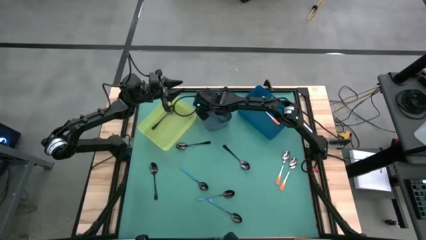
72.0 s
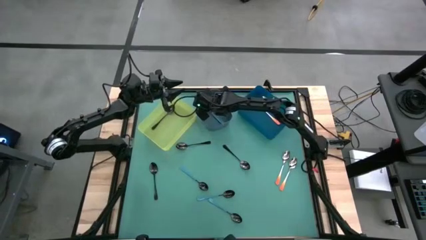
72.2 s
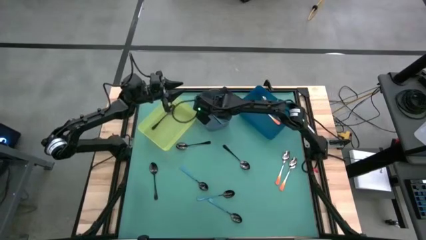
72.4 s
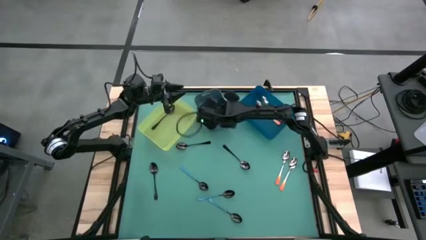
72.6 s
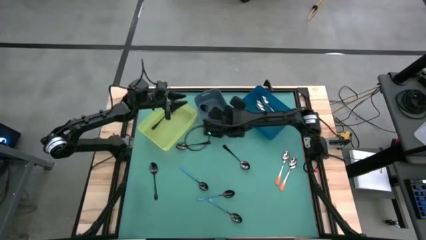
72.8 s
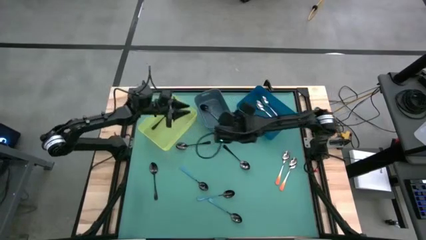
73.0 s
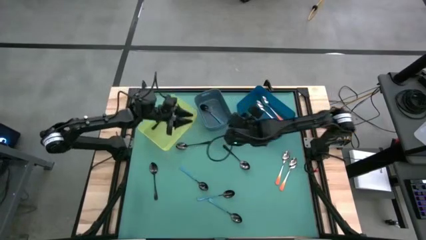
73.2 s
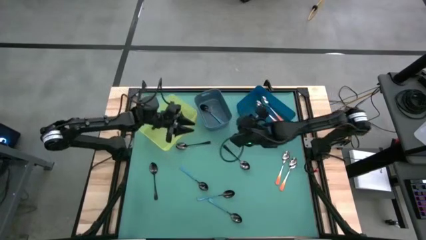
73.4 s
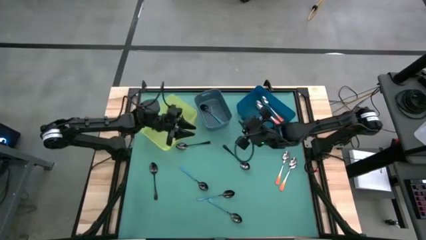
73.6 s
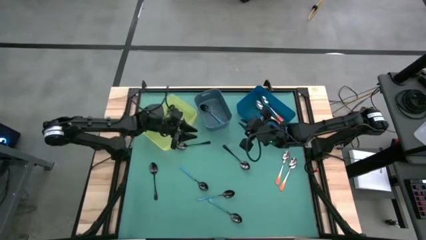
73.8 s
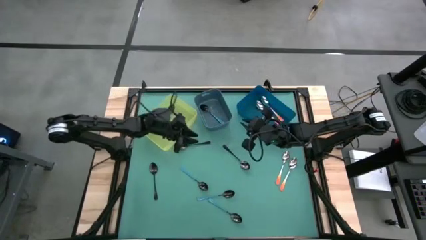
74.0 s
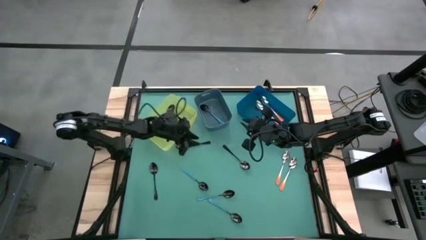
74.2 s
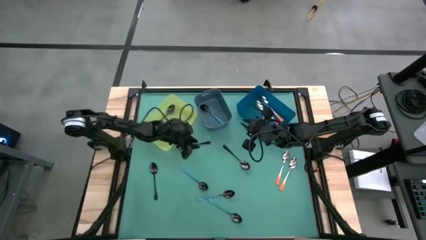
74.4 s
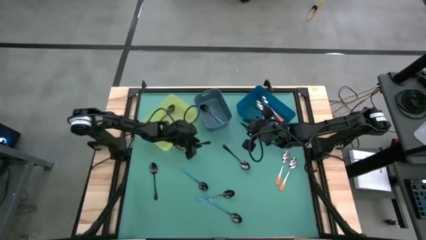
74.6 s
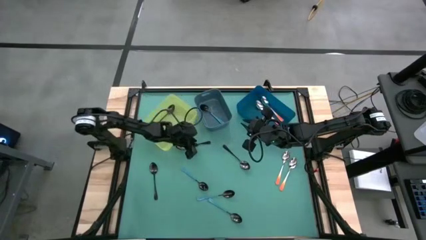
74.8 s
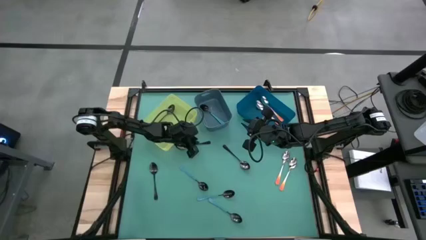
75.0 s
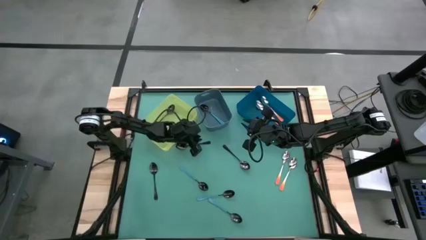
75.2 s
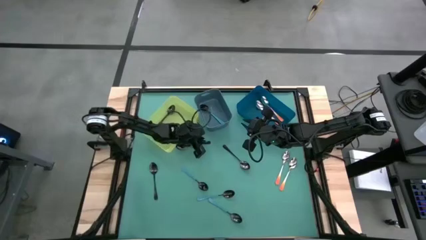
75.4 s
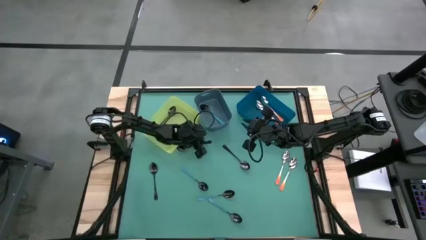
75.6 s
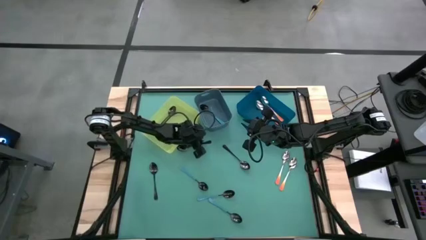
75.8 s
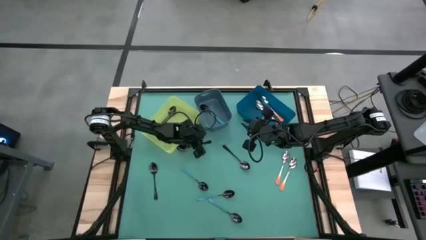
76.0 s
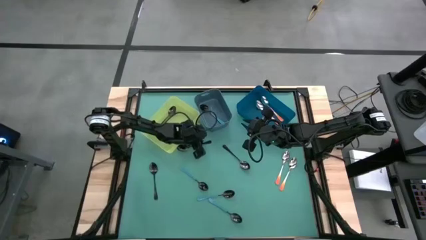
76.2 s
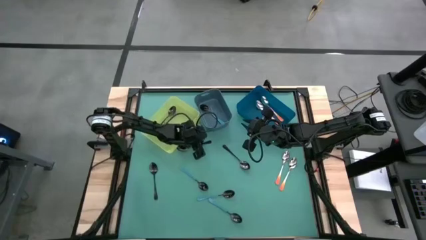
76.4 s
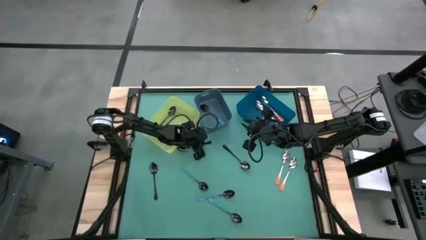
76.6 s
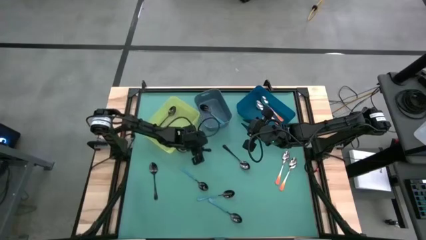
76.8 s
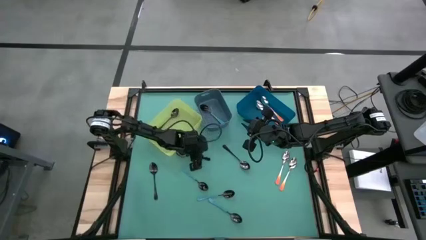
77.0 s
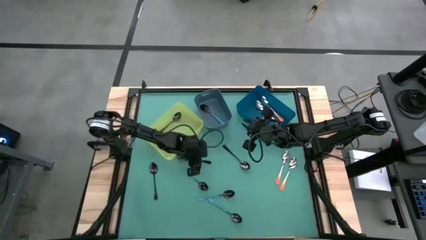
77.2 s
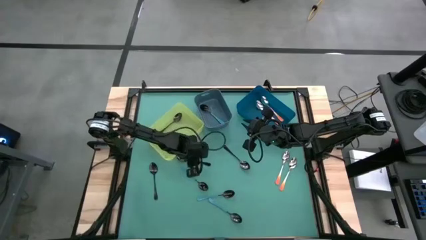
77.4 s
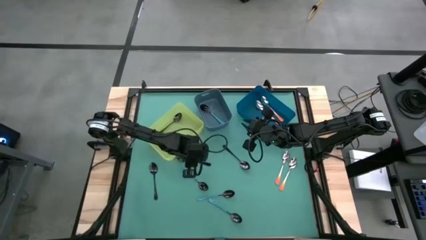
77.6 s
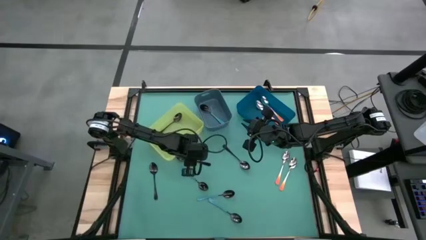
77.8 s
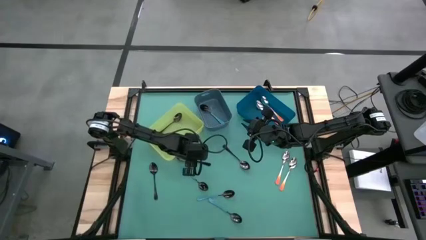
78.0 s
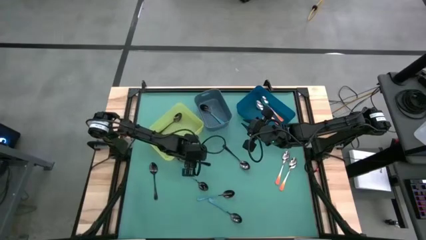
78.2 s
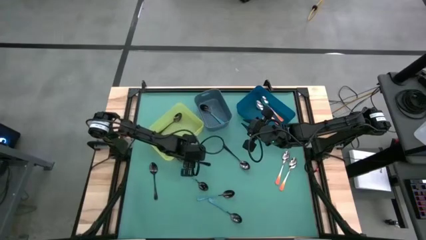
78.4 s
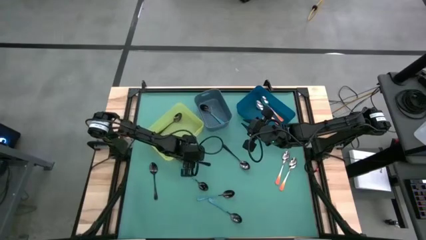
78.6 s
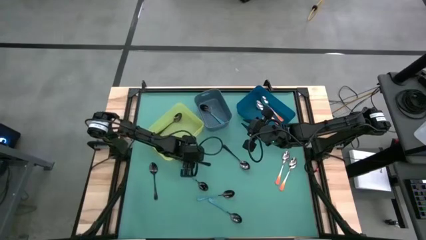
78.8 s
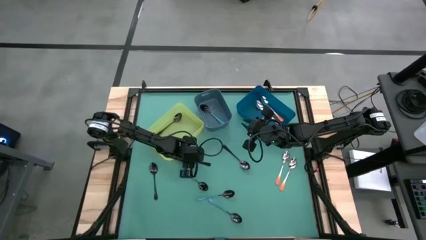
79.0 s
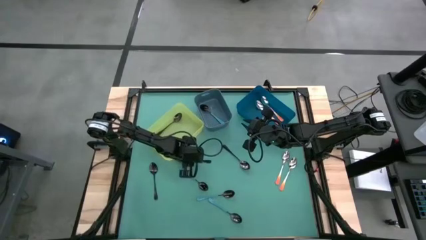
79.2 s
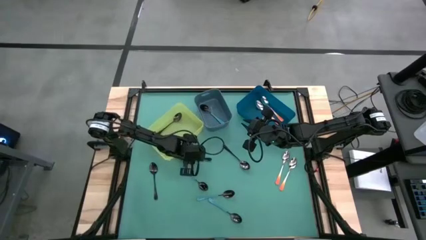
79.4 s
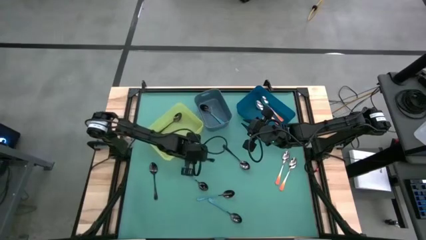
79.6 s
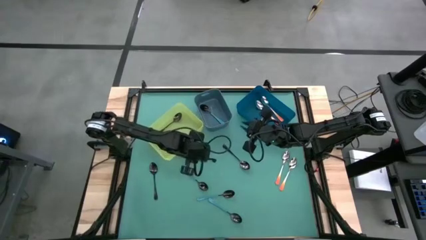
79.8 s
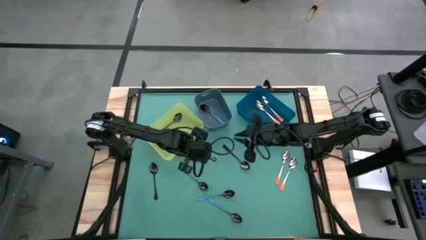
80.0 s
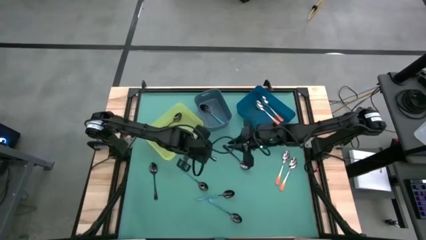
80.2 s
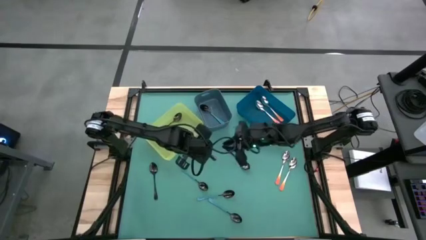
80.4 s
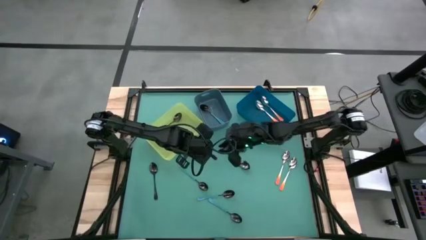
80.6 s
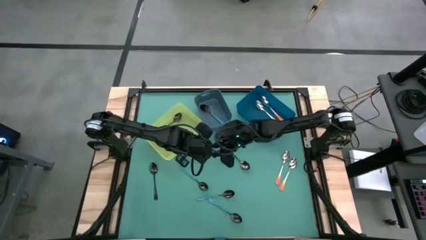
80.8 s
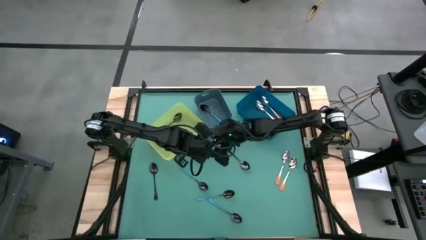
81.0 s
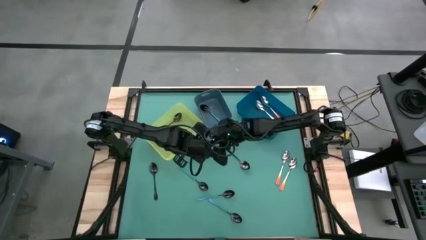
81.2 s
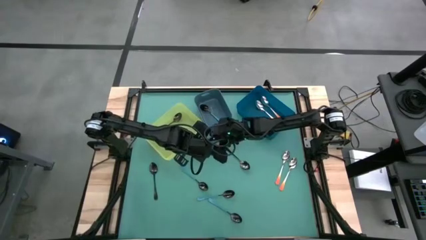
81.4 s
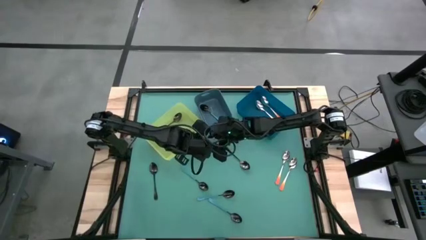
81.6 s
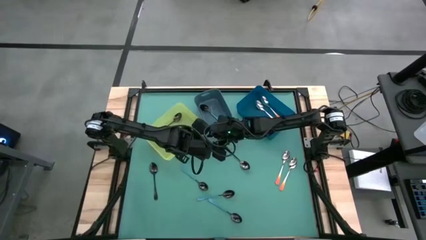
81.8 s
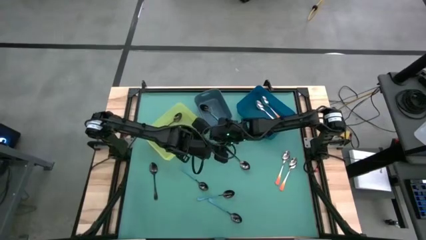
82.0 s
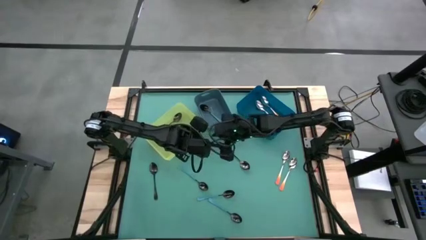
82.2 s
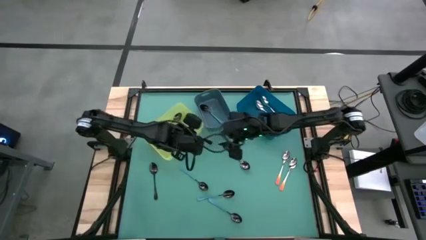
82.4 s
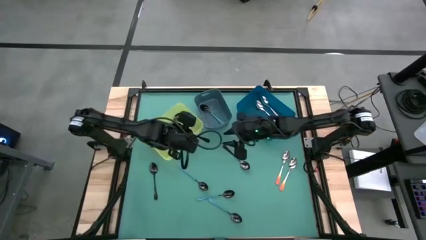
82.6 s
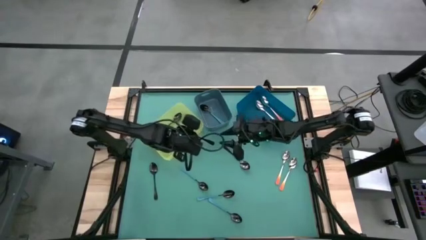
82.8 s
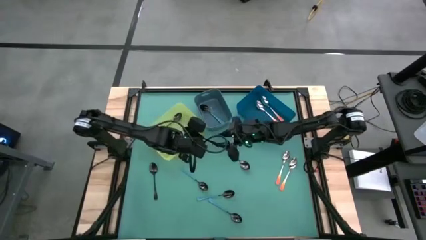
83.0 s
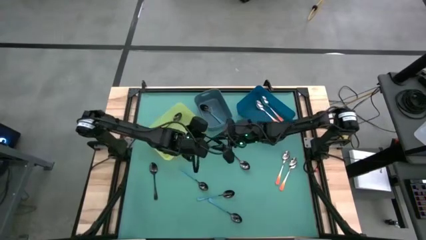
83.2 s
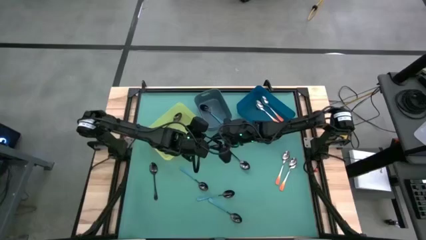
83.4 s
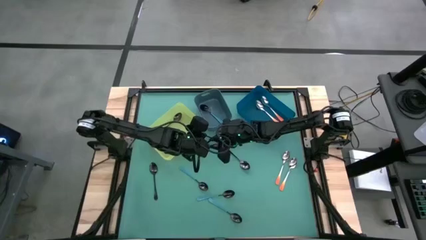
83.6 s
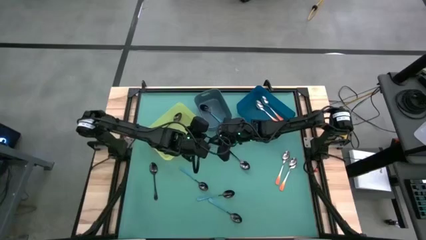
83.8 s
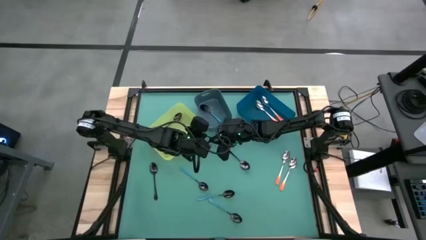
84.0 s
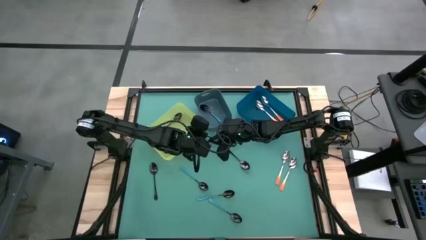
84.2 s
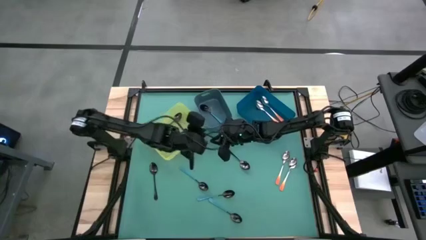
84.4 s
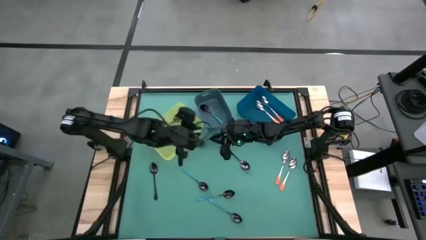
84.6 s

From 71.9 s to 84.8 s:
Task: Sort silverware by color (type)
Put the black spoon into the yellow bin

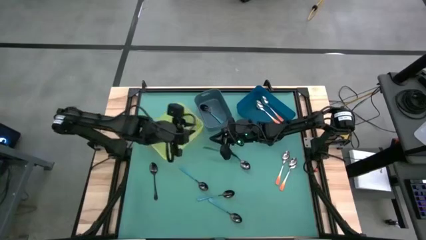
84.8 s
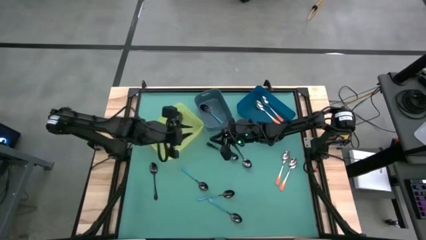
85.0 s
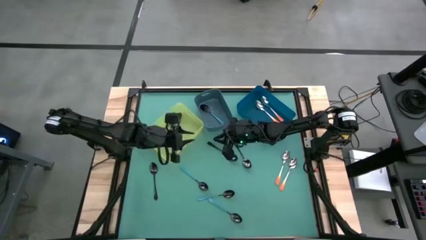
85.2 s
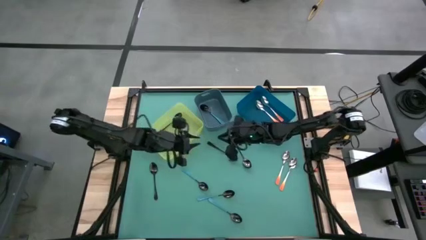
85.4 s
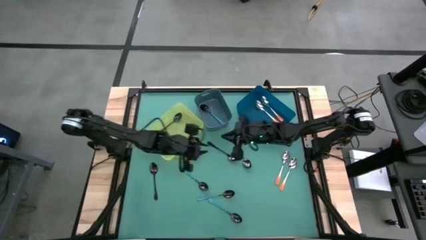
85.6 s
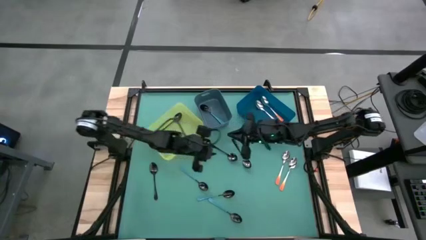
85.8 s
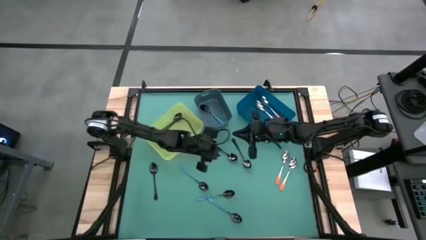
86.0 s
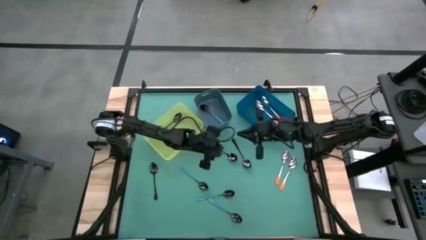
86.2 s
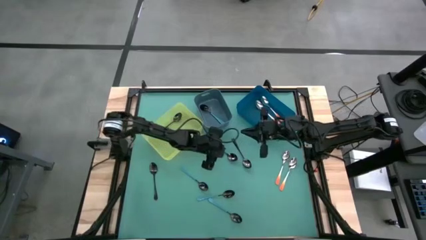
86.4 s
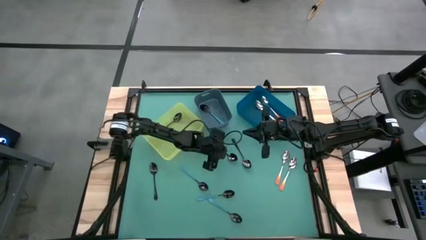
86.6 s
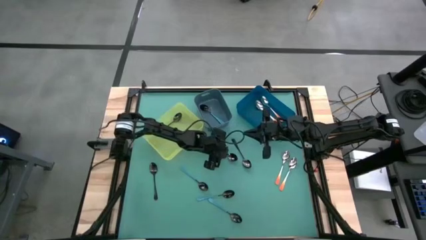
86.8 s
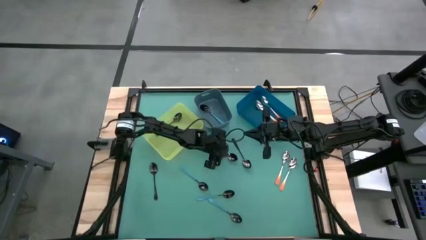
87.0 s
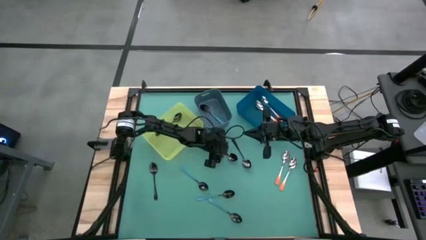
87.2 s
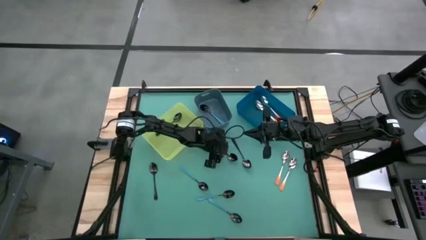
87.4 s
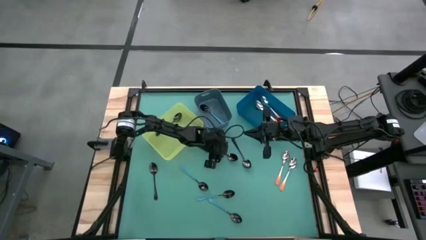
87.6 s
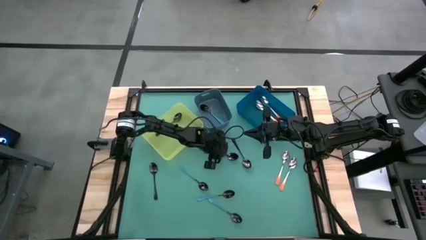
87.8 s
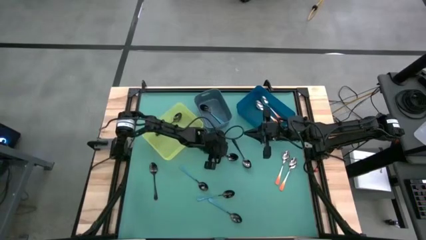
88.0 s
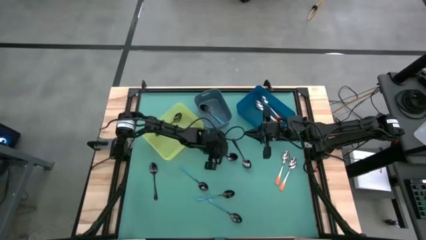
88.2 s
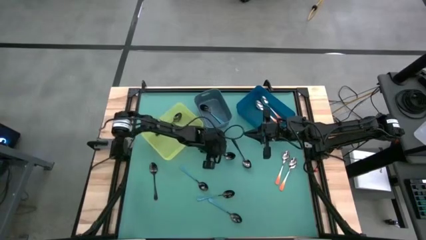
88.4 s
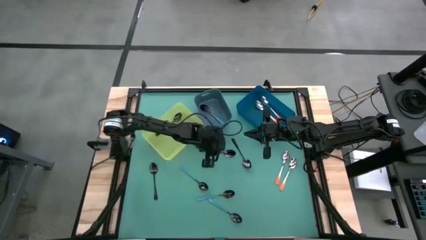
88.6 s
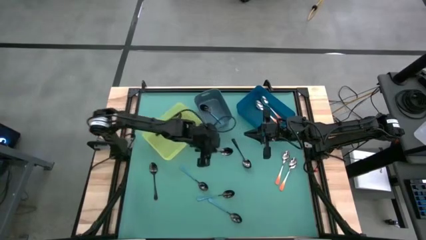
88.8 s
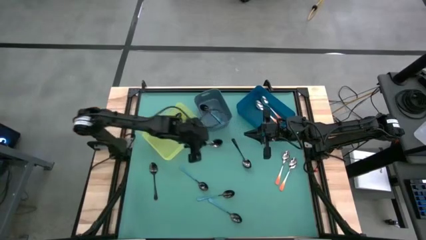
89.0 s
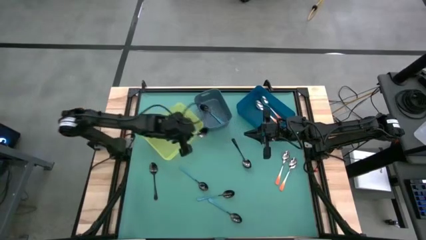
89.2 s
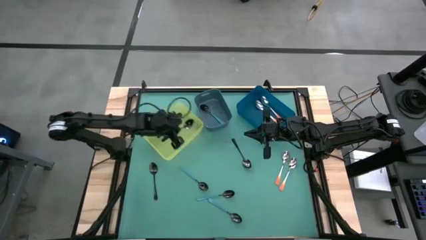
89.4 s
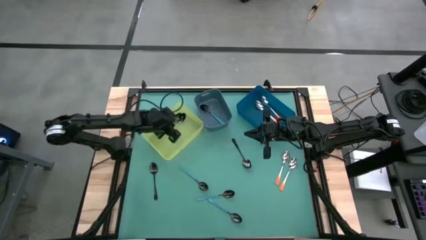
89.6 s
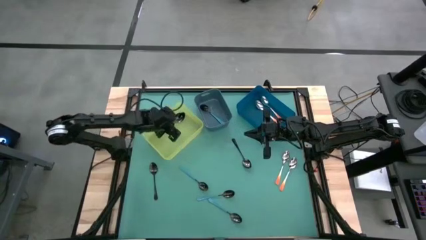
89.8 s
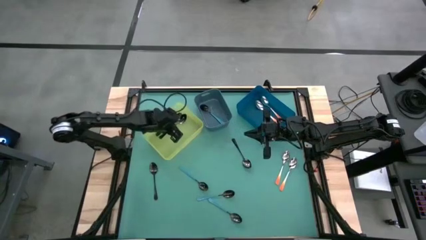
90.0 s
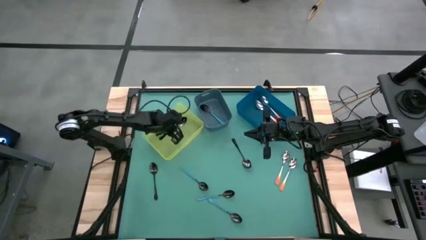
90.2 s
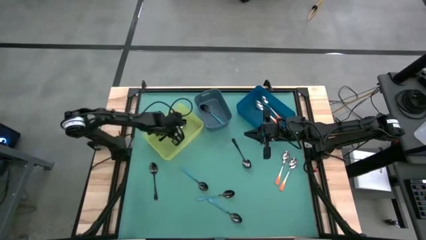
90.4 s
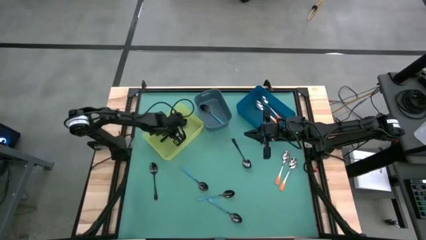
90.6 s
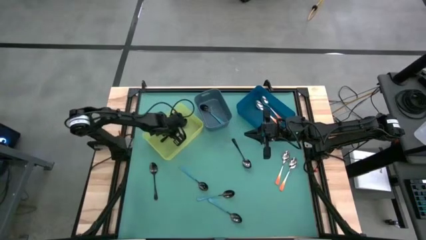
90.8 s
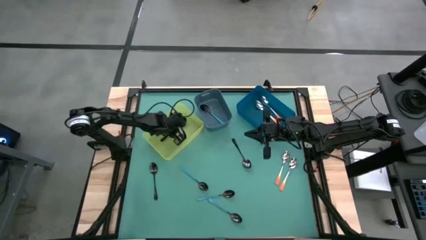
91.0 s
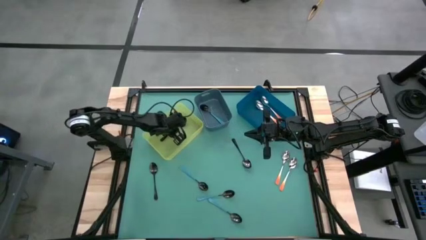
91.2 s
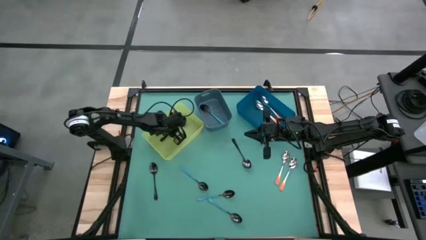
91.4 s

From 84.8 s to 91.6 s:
Put the black spoon into the yellow bin
